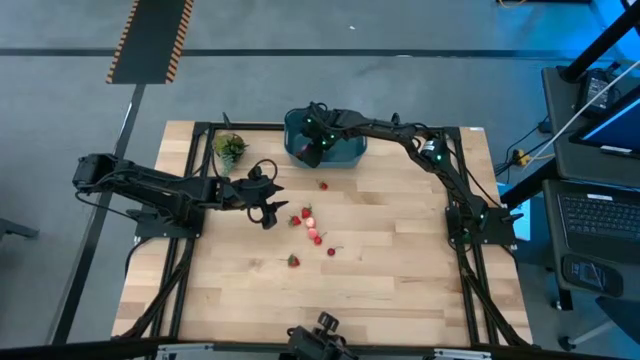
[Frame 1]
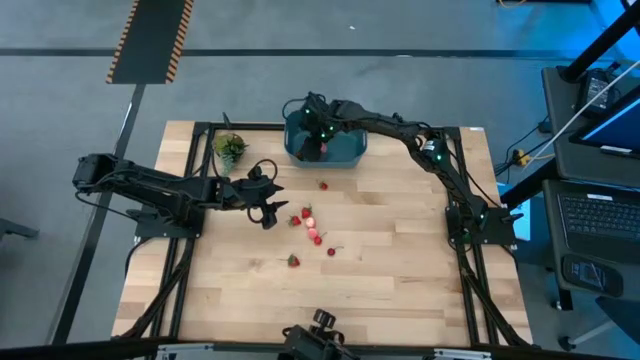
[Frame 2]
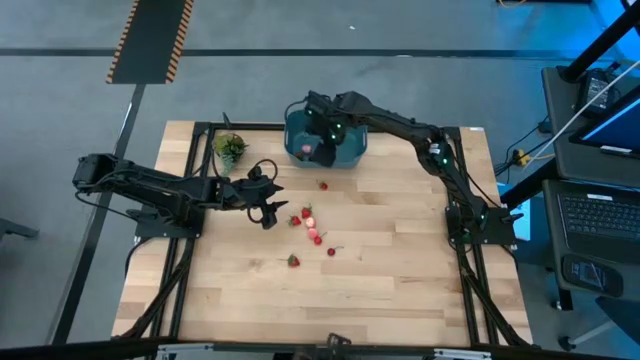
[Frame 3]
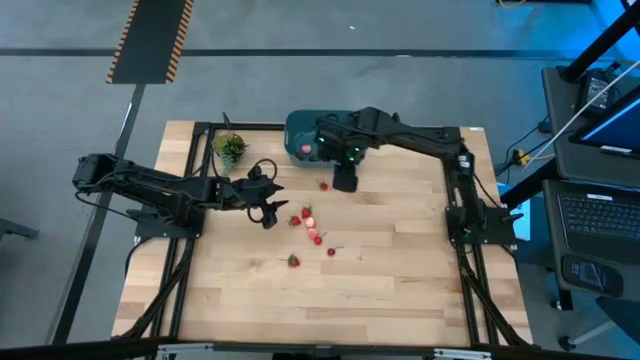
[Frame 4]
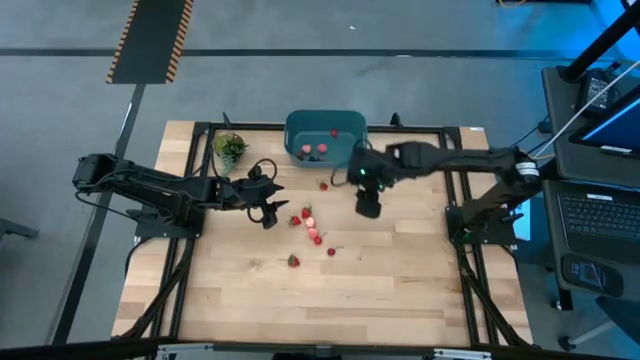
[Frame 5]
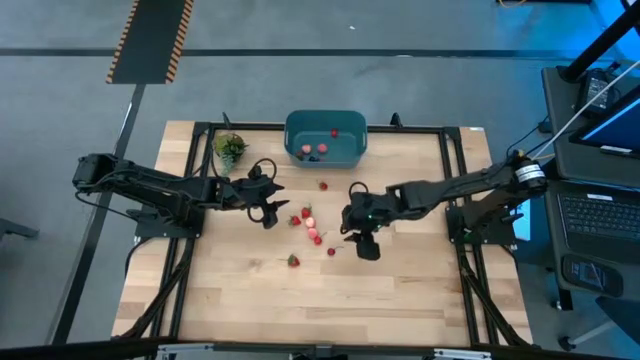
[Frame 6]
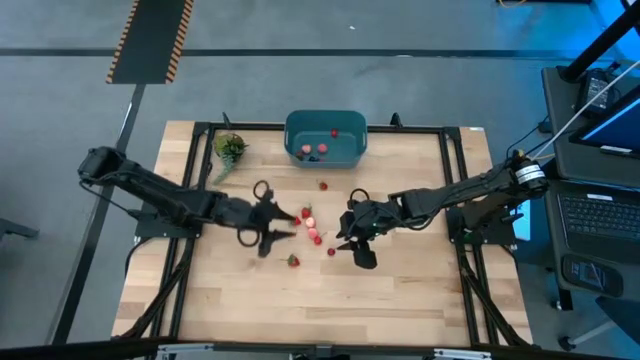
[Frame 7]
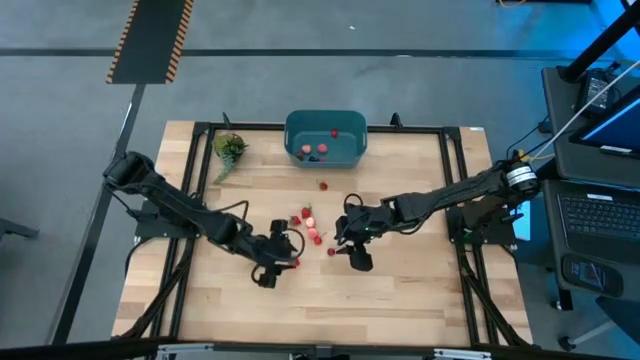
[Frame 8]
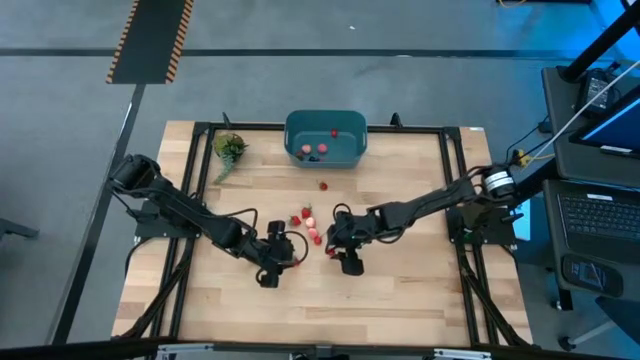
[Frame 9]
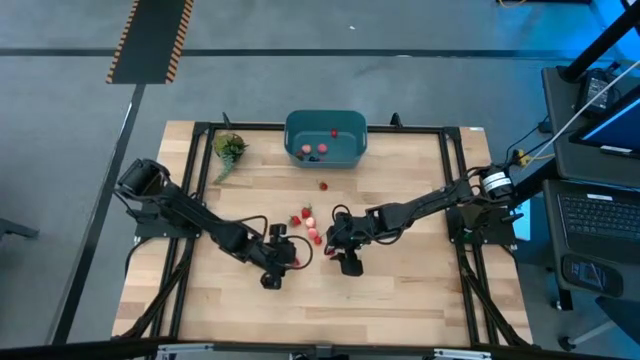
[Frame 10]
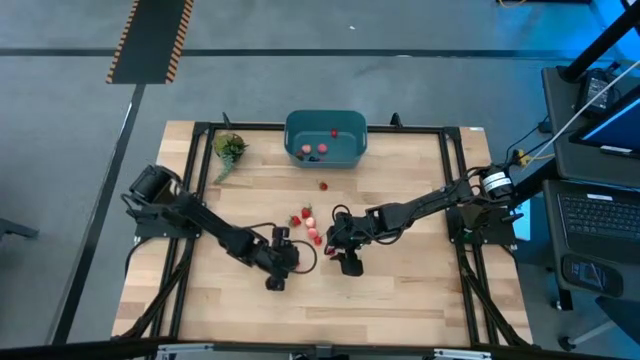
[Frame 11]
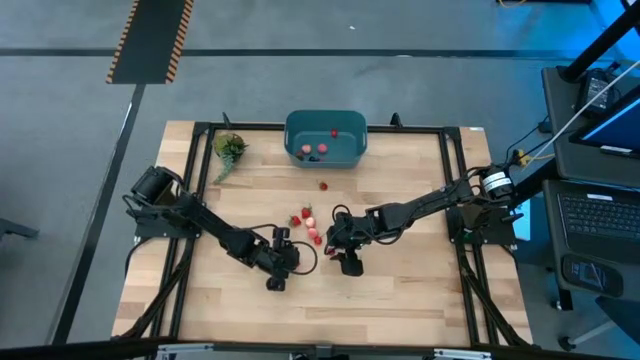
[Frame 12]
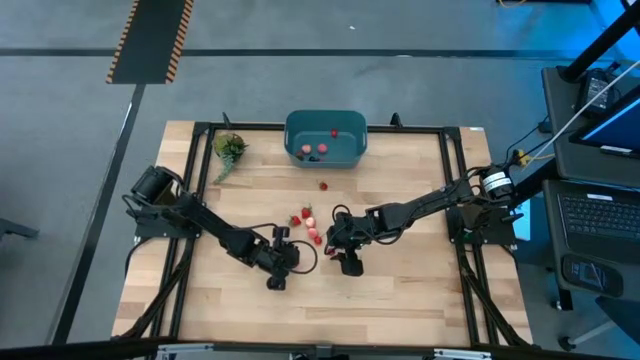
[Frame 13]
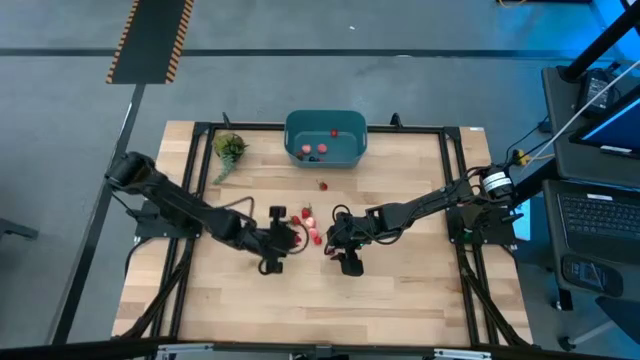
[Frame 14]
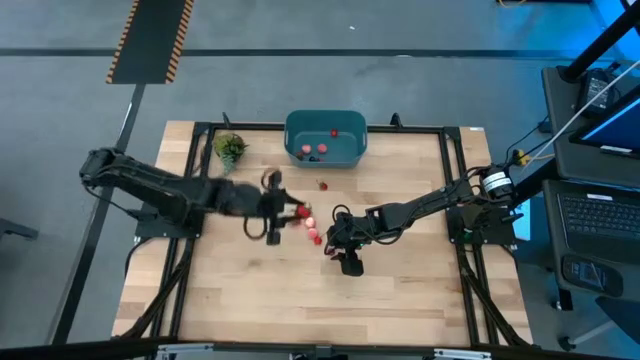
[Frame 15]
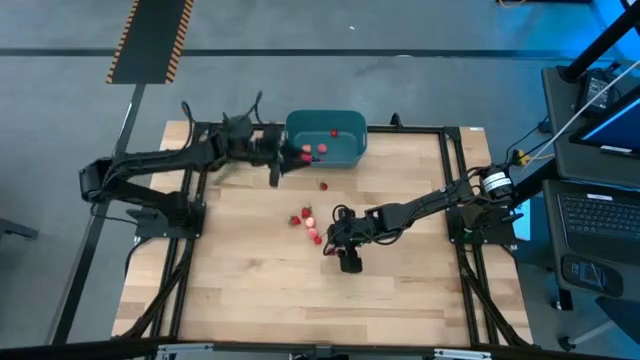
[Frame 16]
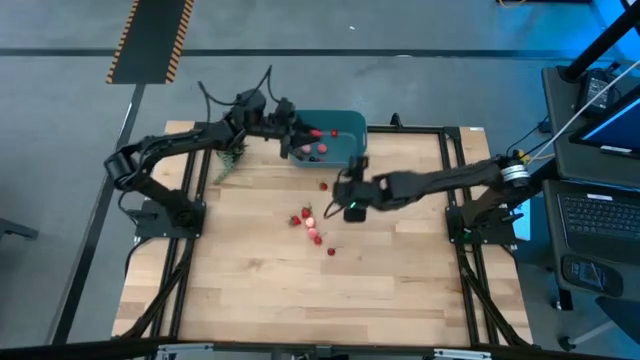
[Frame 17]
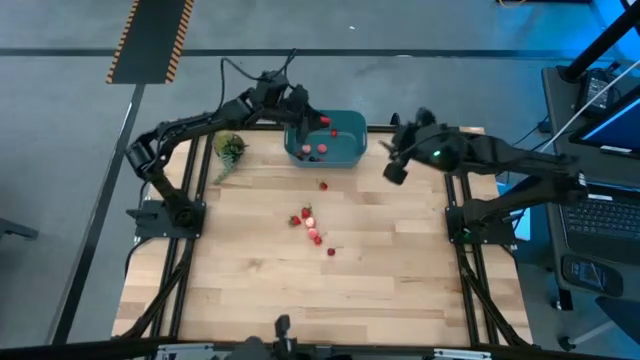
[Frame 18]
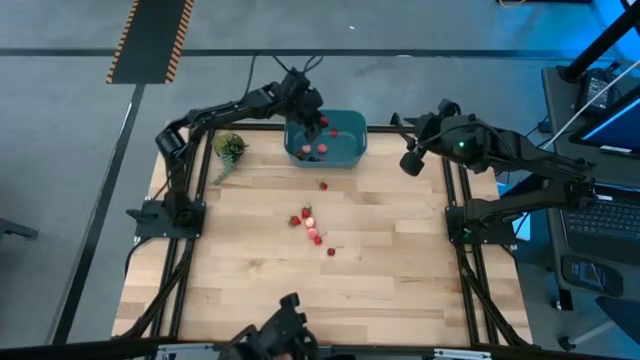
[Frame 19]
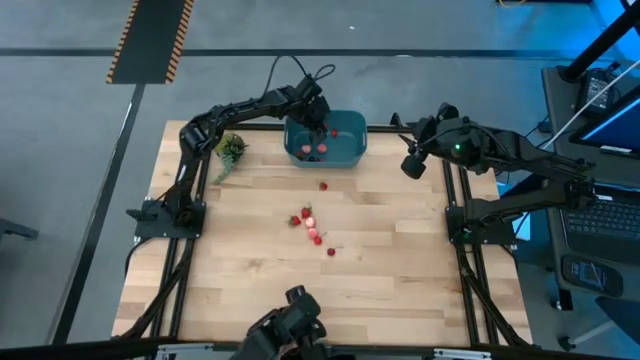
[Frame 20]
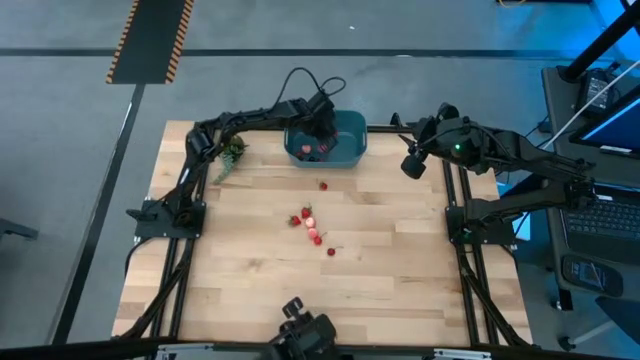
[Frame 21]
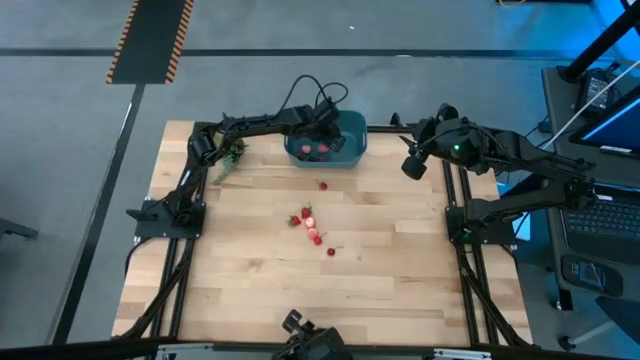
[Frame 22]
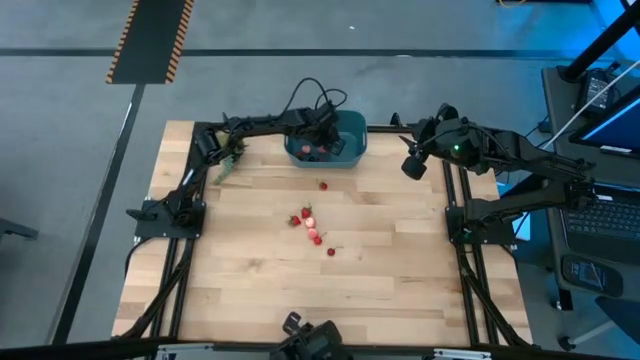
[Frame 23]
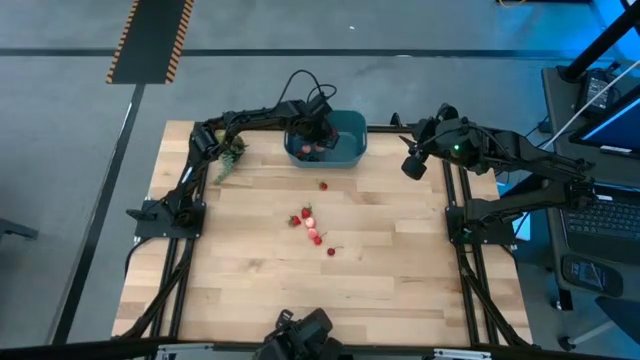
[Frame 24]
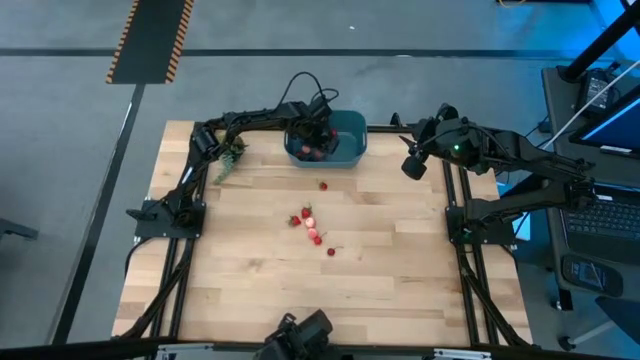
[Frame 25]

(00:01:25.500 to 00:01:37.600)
Task: Pick and placing Produce into tupperware
Put the strawberry into the blue bin

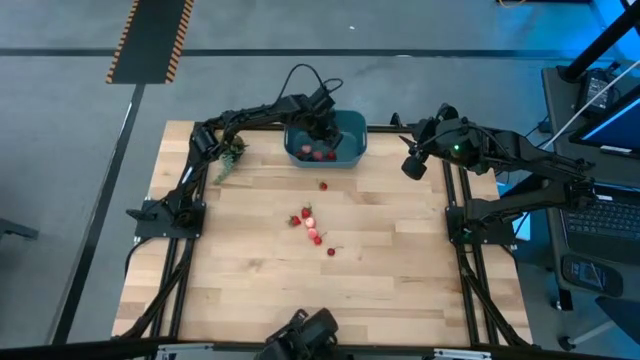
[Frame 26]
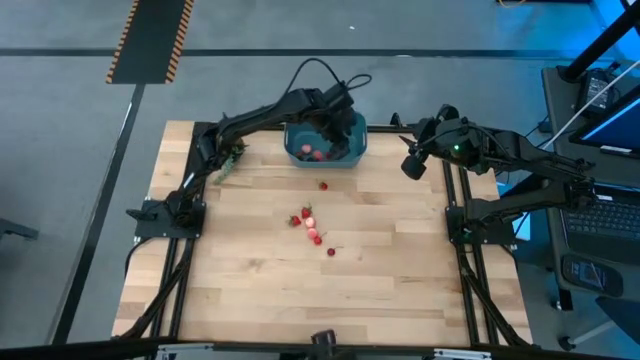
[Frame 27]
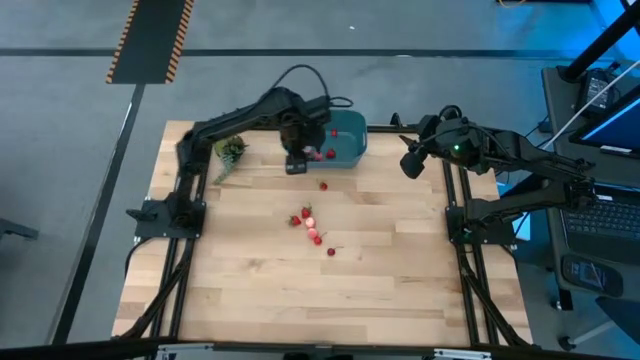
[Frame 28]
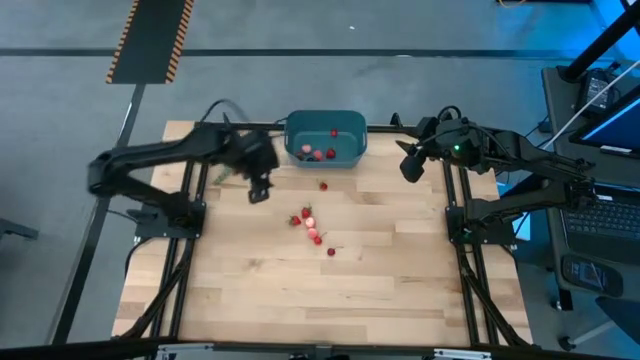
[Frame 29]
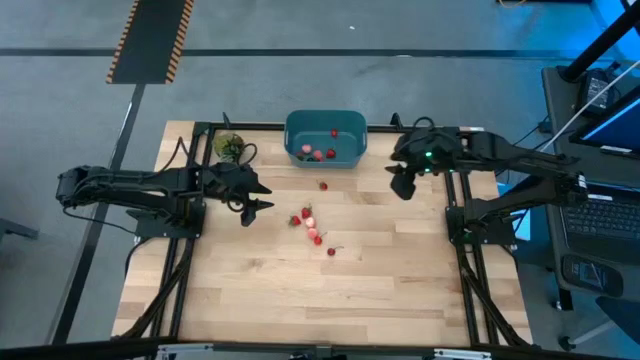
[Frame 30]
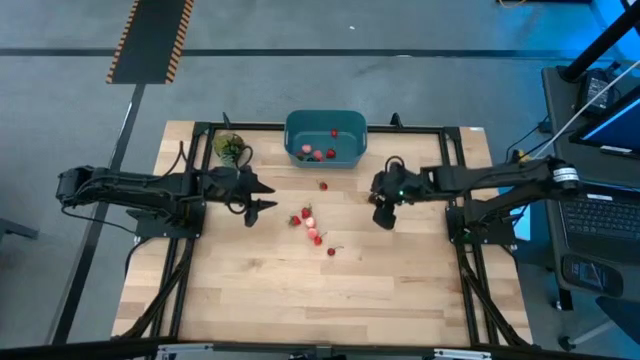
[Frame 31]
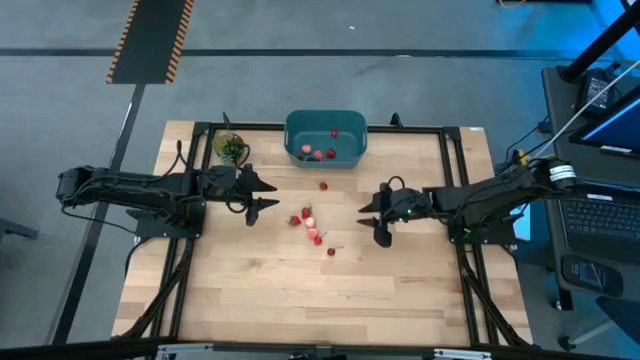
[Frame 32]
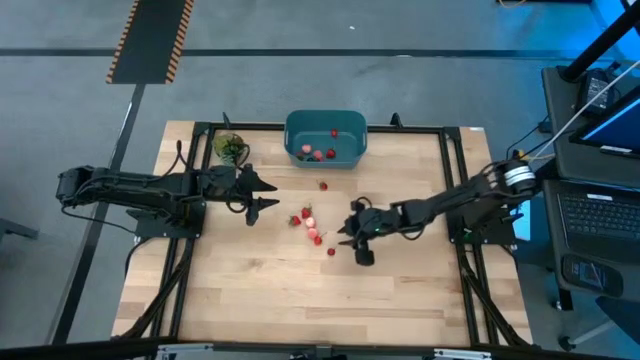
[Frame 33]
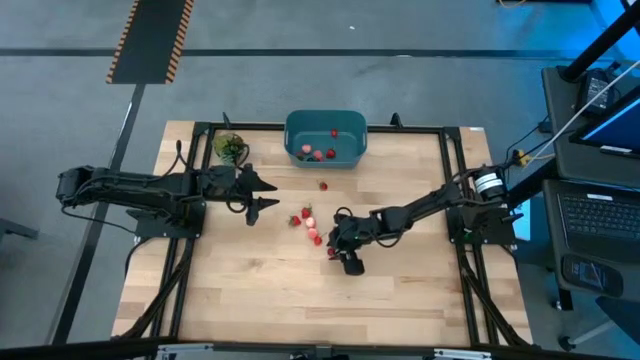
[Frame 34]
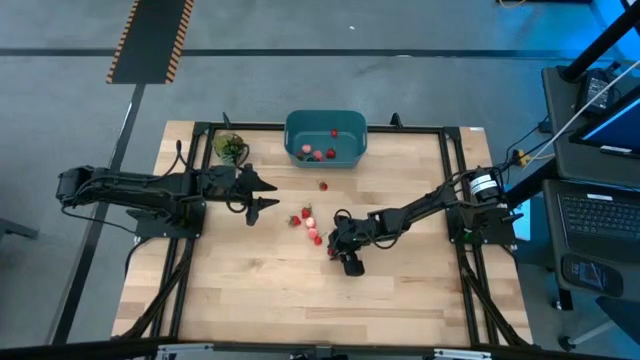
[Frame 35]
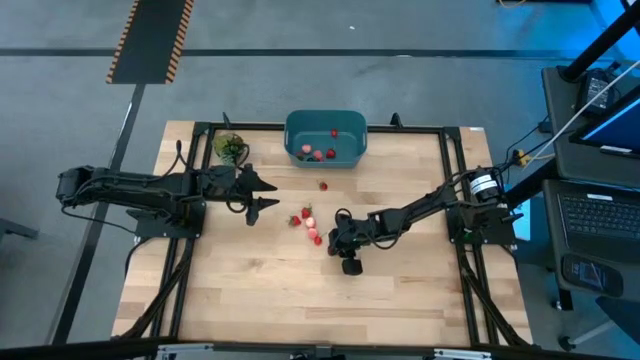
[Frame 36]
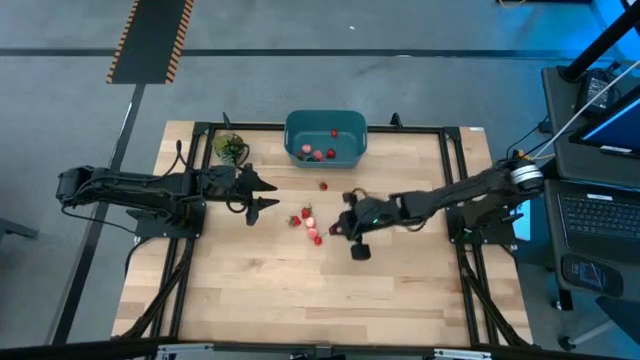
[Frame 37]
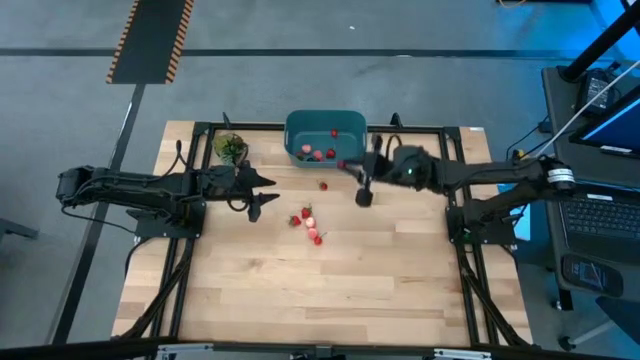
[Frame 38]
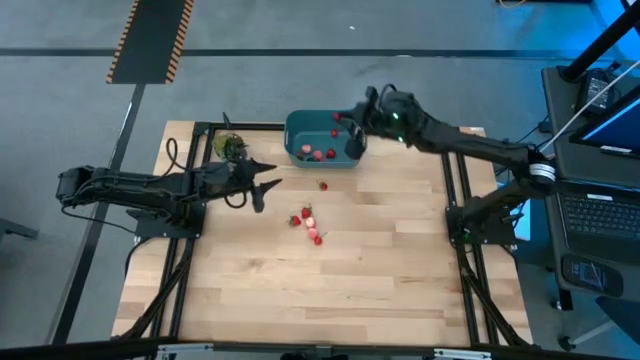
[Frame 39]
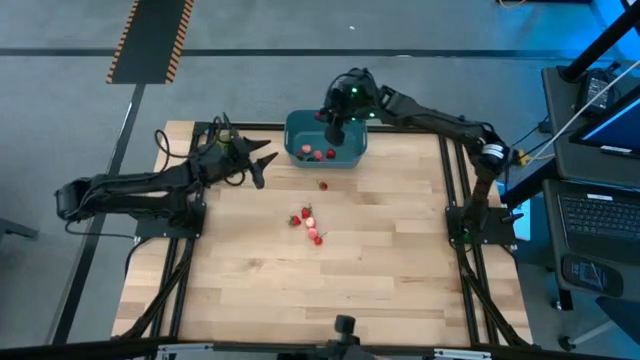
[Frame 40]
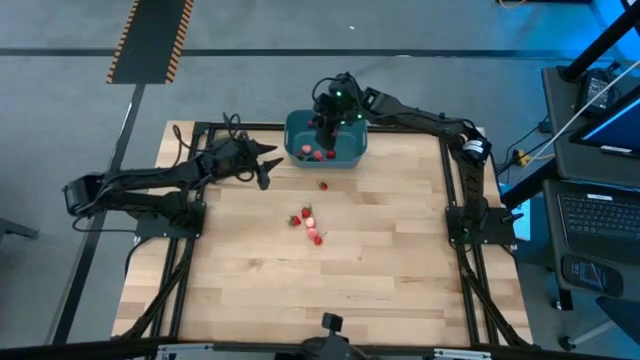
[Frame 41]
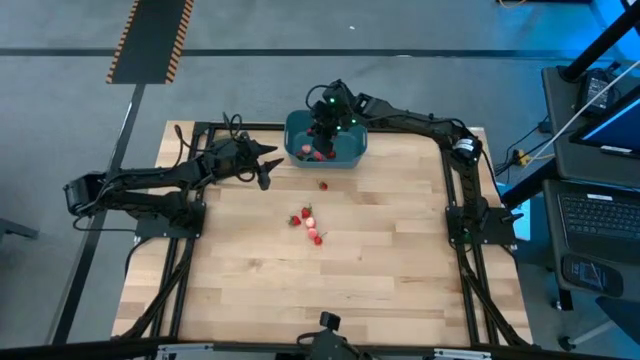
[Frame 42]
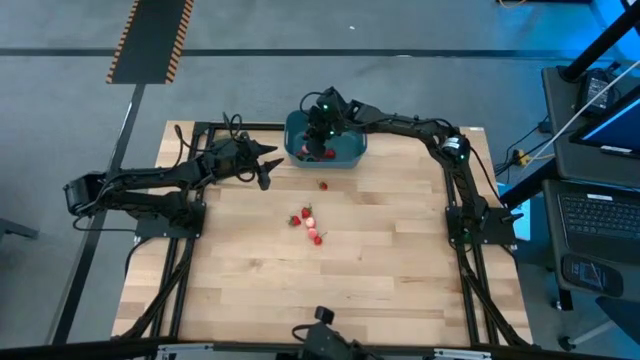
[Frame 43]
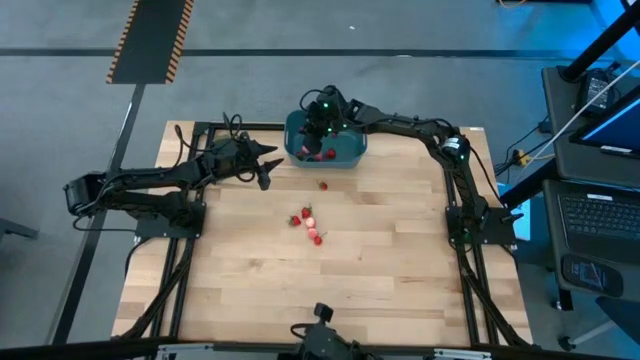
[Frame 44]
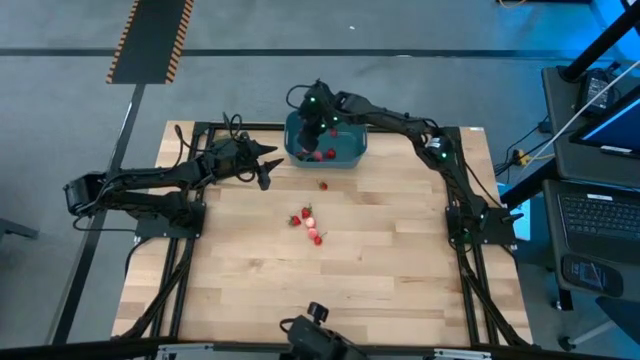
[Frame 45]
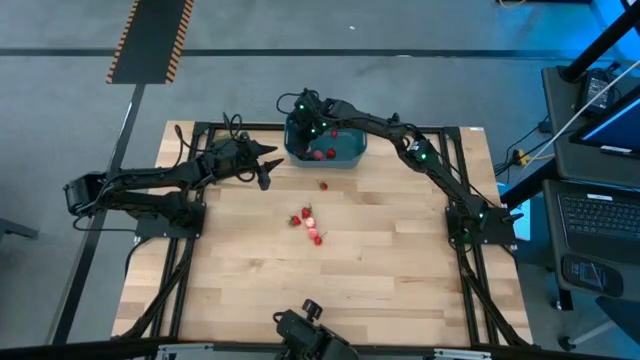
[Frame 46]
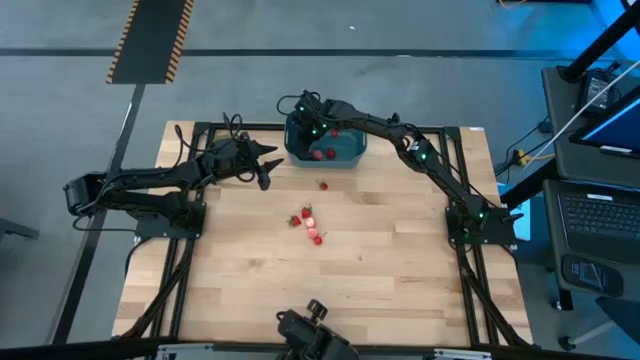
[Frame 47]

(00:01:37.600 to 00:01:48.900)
Put the red cherry into the blue bin
